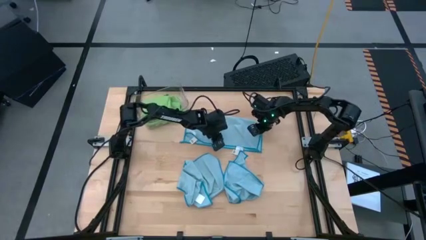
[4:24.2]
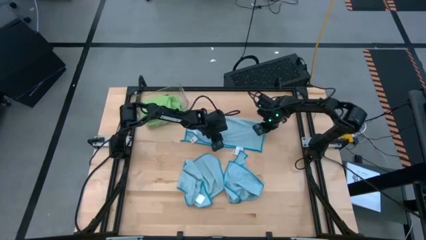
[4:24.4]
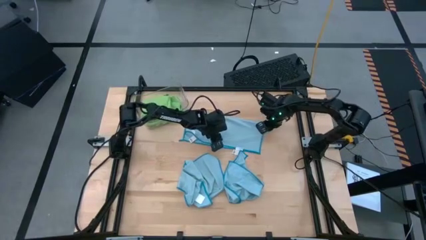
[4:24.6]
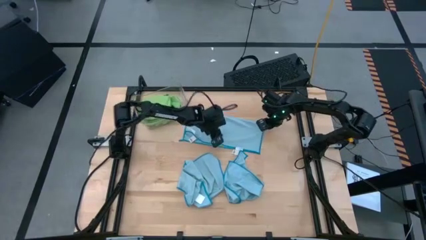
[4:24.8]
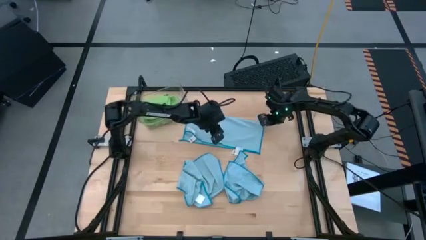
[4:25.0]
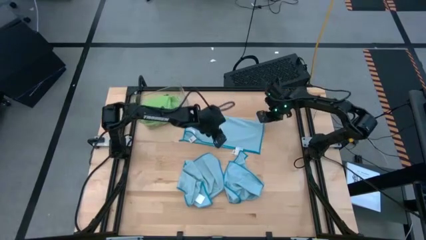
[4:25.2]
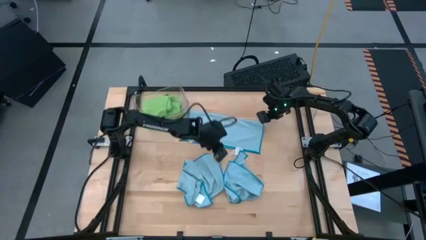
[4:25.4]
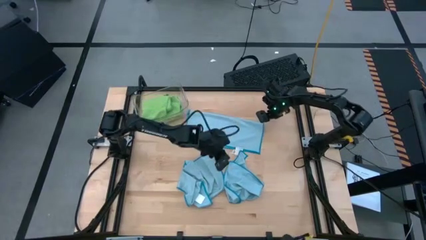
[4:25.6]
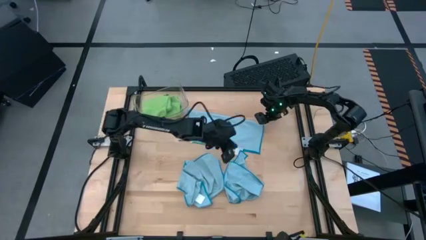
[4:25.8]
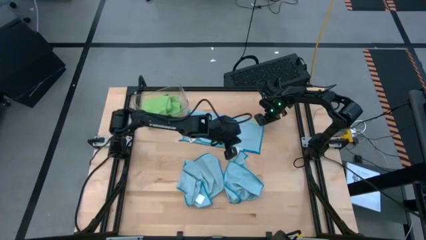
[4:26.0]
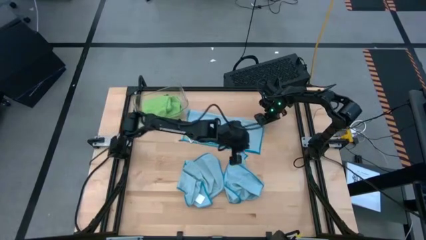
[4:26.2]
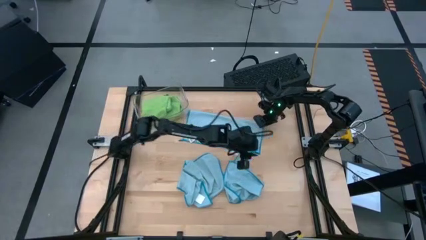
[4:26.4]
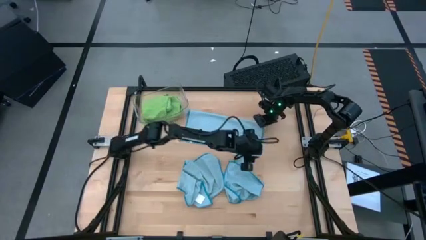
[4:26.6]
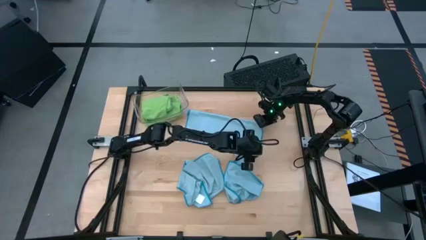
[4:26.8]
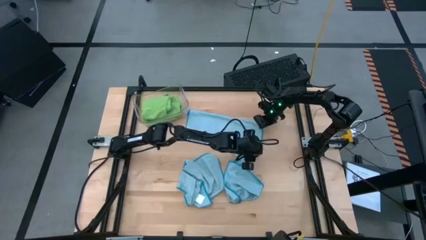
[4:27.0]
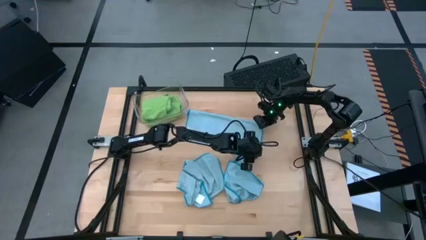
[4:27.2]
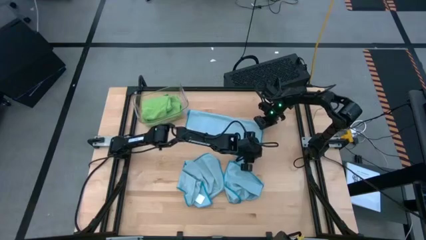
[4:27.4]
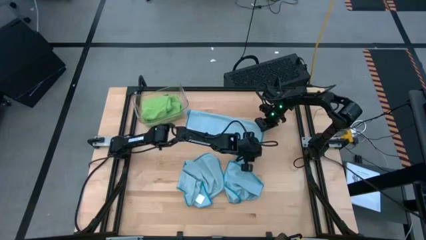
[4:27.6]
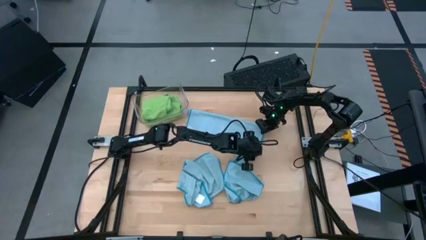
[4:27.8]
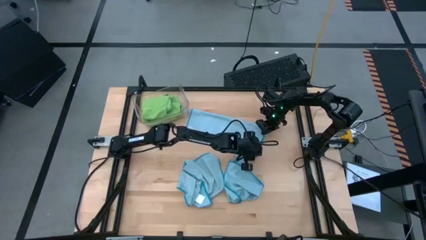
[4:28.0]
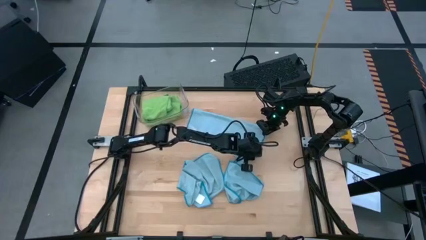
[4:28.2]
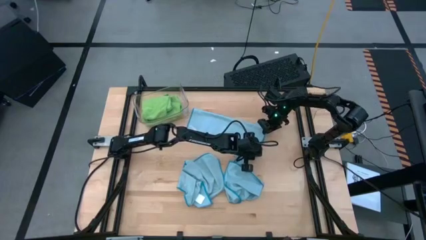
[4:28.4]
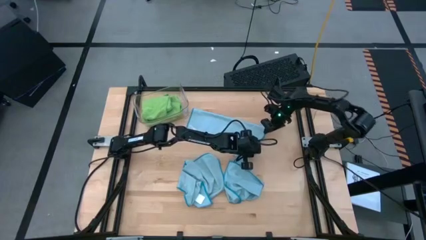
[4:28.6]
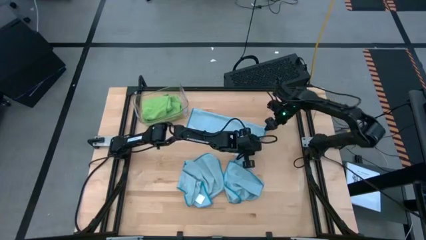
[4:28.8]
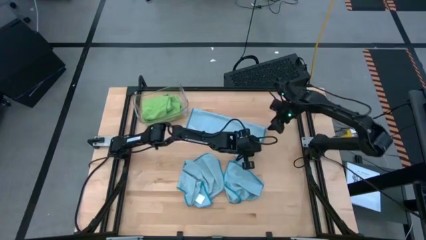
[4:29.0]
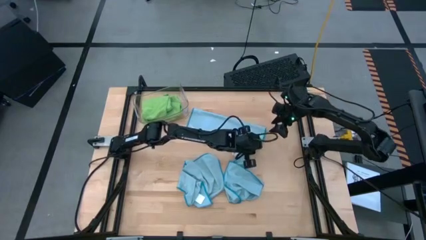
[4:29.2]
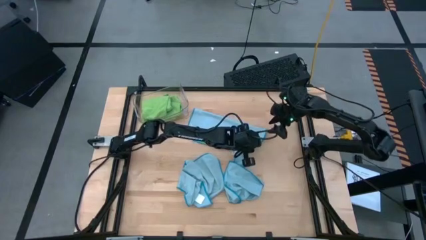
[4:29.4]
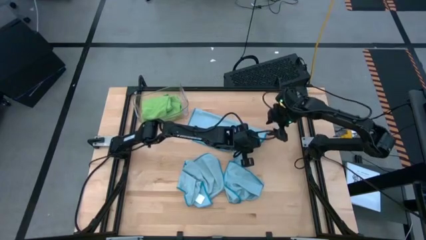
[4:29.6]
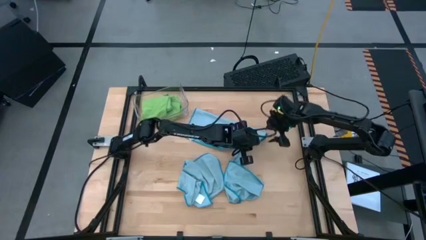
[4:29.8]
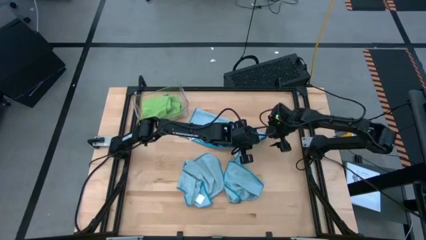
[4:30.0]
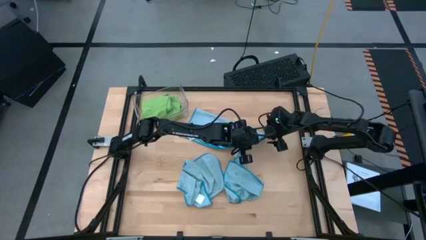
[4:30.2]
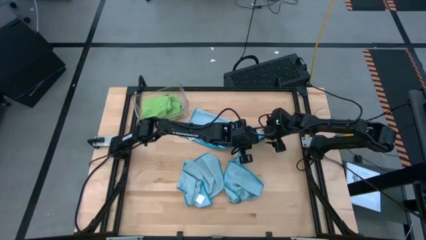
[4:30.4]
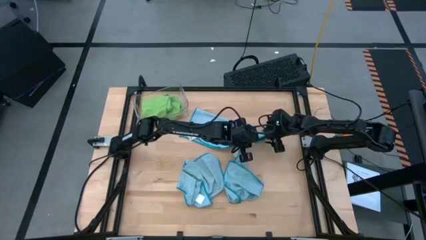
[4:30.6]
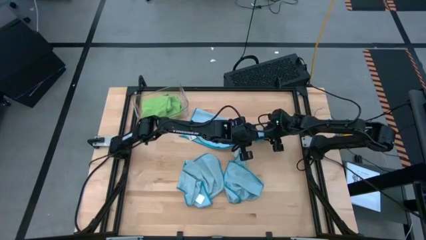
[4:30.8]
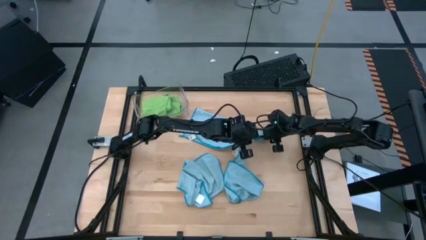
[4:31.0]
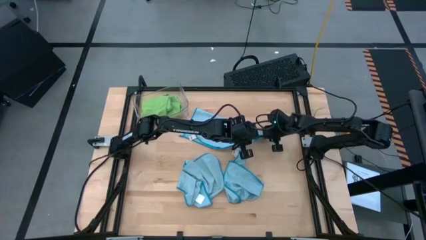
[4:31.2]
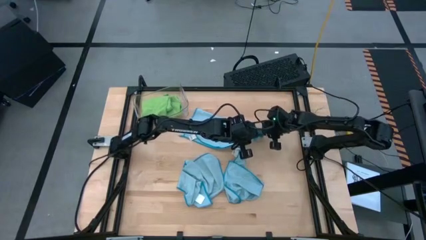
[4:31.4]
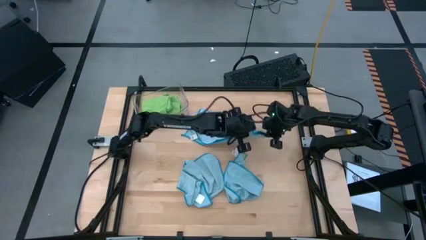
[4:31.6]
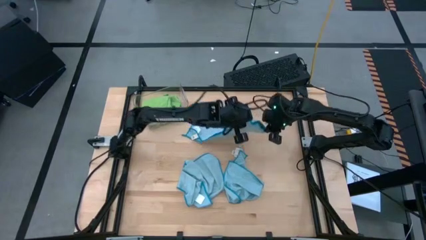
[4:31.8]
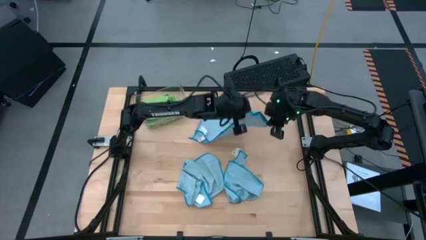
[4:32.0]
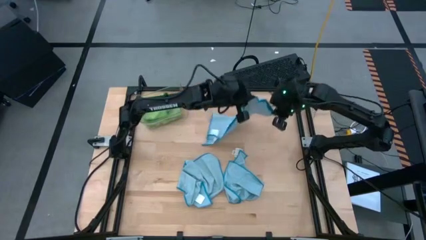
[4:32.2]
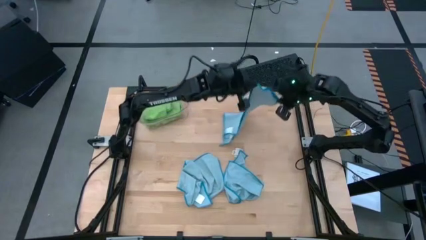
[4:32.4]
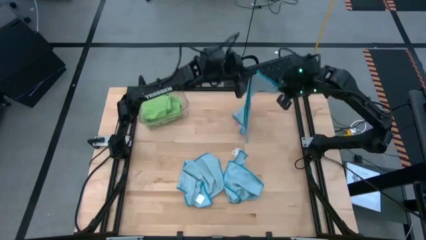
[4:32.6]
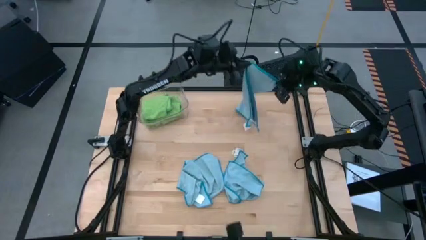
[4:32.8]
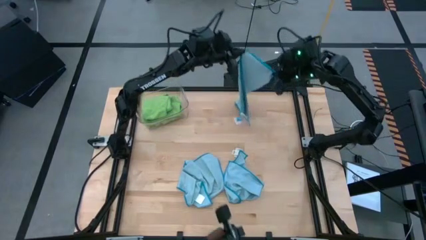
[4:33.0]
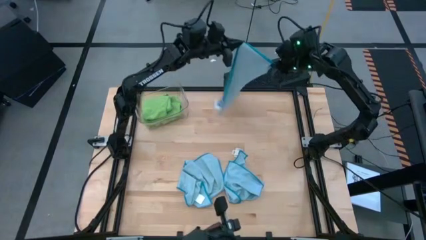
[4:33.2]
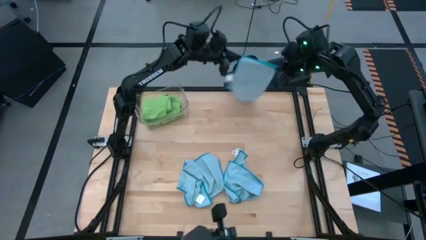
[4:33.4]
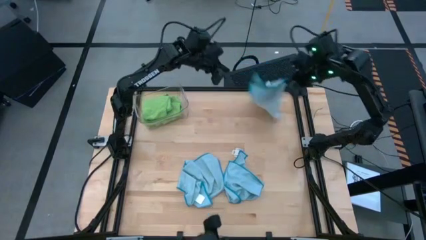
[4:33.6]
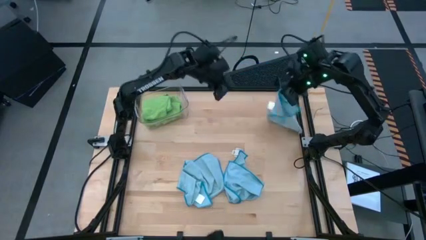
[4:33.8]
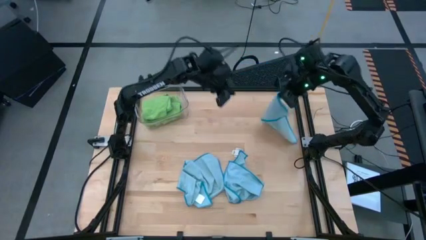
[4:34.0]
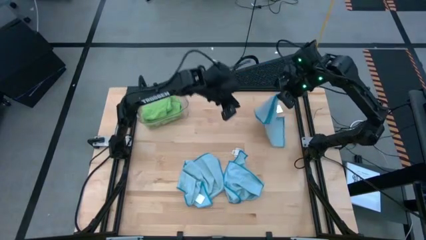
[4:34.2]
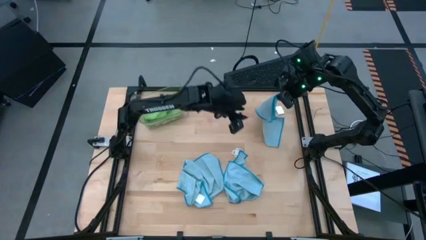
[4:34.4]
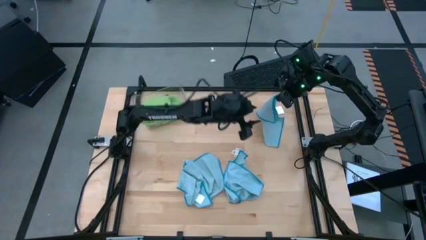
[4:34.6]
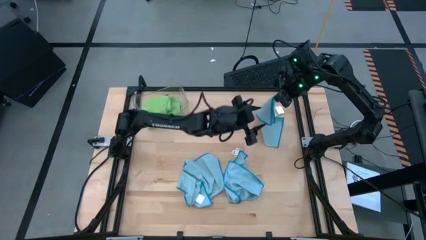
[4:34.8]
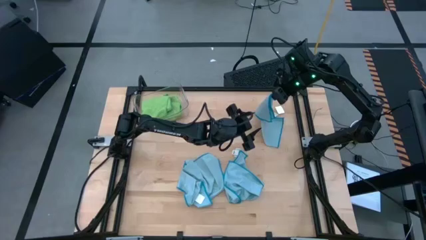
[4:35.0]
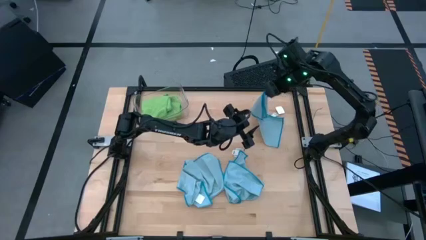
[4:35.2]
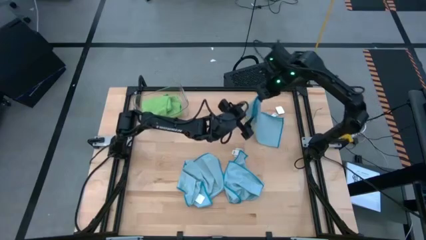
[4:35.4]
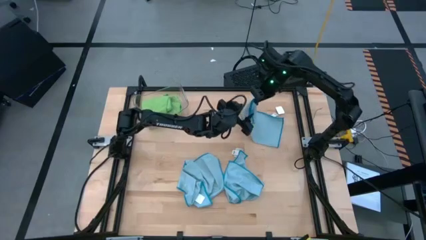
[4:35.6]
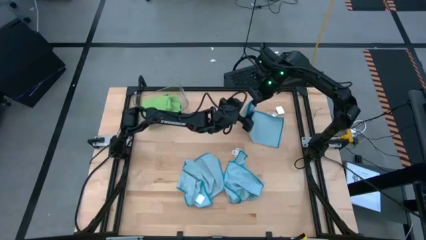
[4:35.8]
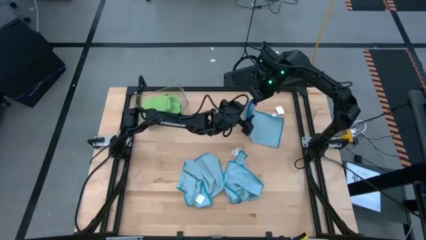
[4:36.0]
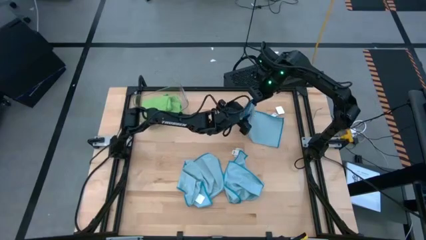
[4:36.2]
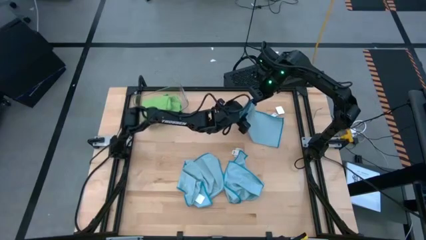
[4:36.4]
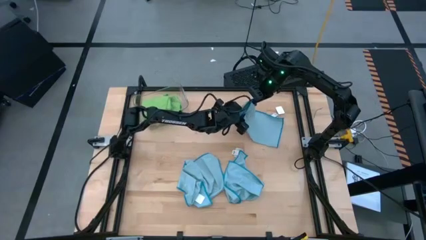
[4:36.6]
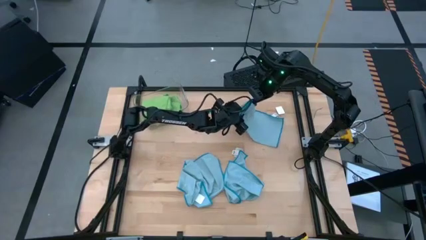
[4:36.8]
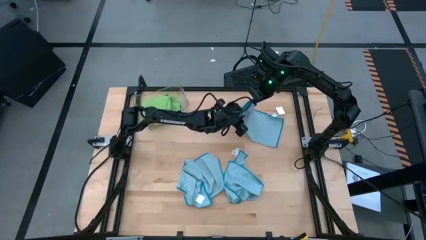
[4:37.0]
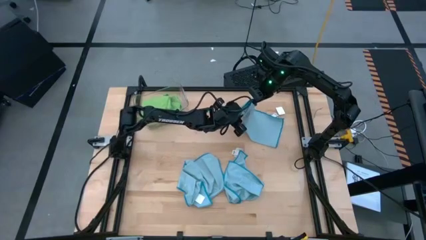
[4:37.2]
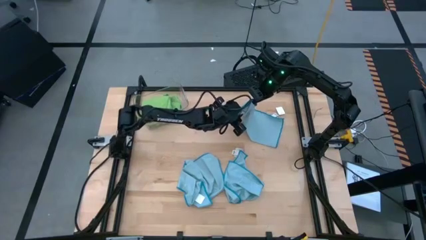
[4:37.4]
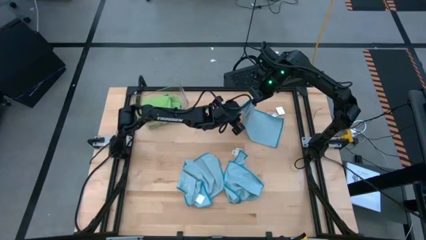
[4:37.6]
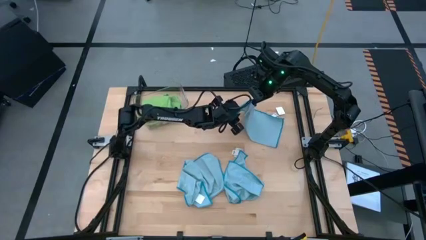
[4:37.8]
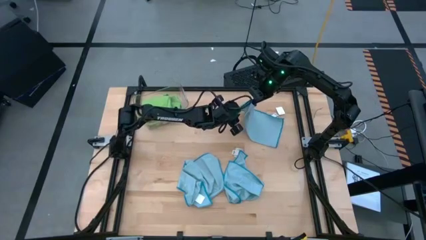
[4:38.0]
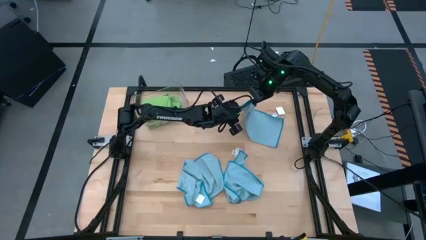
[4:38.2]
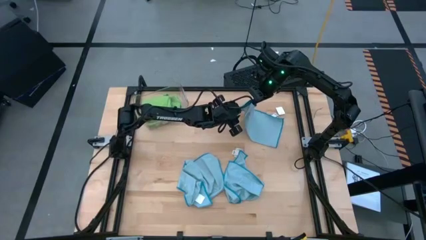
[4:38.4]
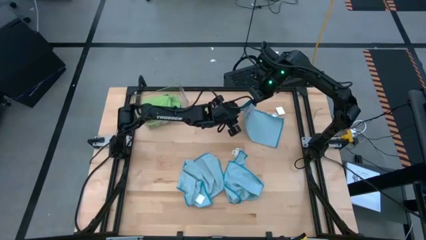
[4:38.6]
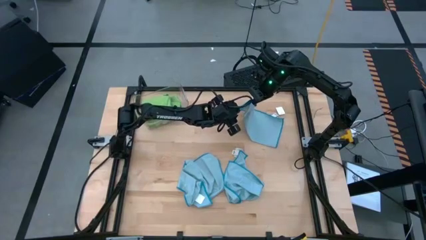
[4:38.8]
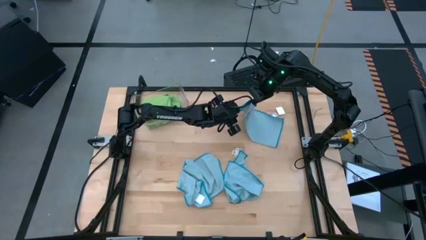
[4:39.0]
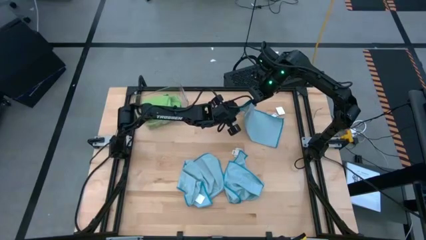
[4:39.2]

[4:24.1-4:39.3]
Task: Fold microfiber towels
Fold the top center blue microfiber cloth
